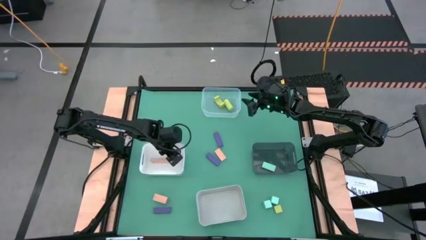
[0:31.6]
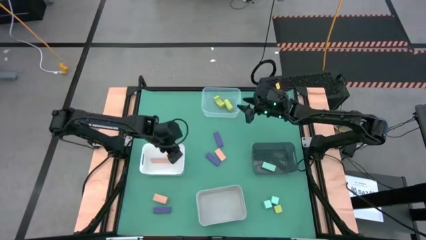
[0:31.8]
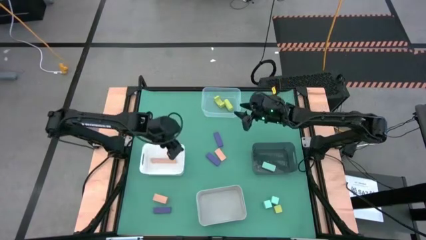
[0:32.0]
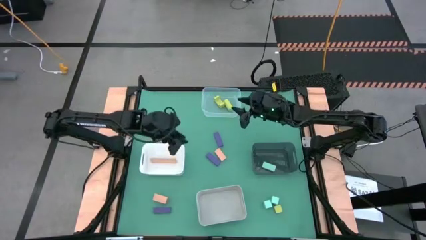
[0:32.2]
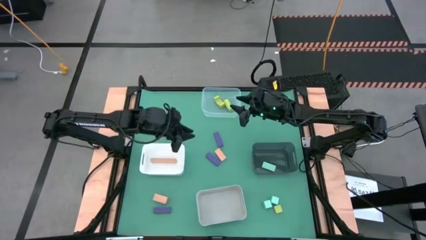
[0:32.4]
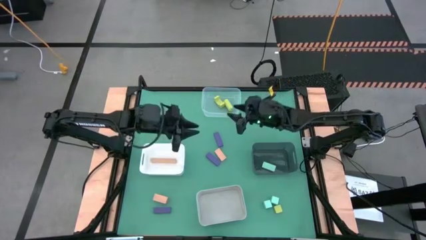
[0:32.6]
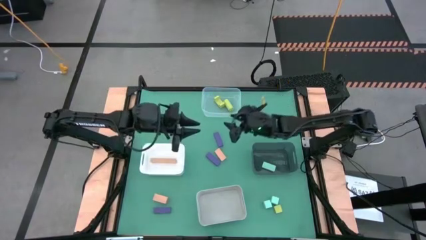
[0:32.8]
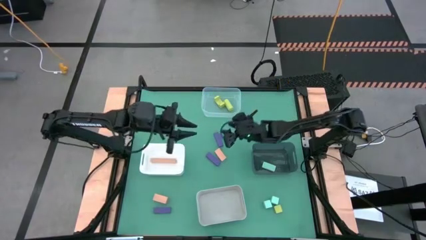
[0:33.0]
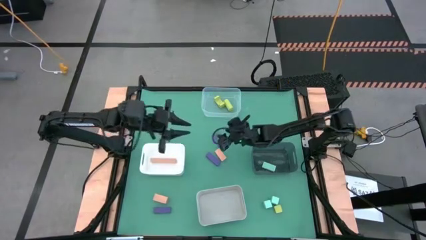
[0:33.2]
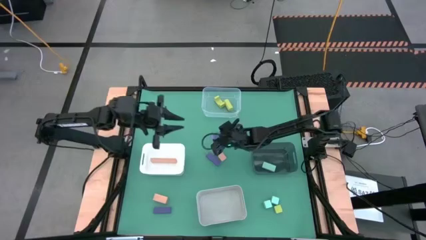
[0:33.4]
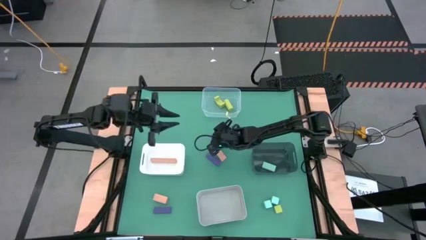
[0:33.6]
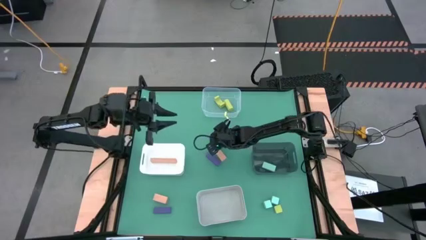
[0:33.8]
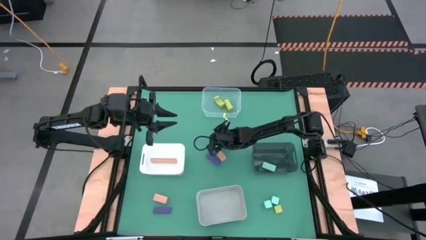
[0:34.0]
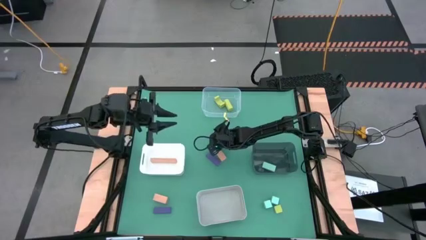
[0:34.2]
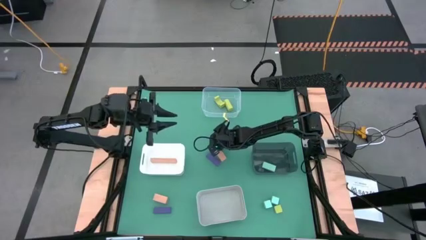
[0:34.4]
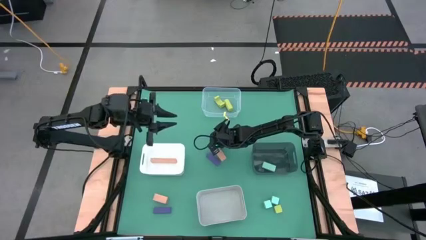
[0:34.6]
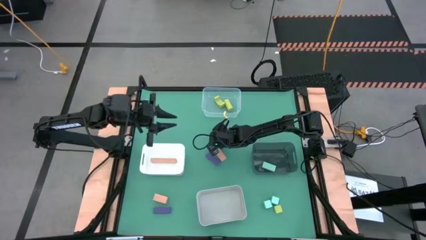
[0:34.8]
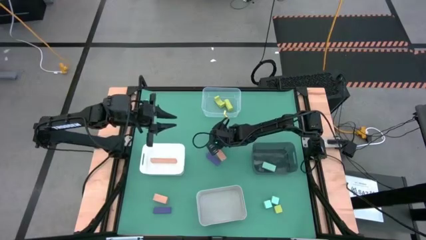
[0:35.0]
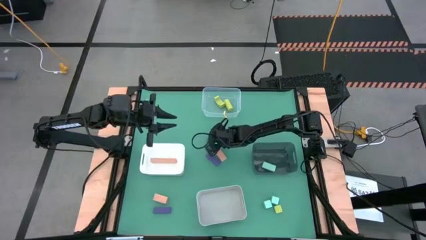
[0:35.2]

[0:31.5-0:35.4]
Task: Sort & place blocks by color
Put the top purple block into the gray bin

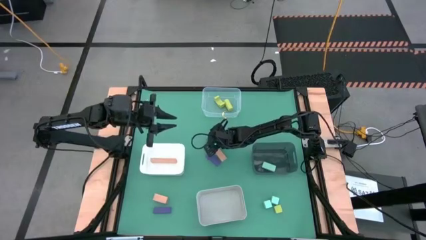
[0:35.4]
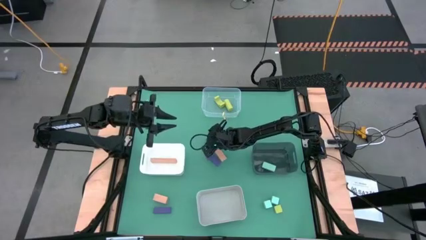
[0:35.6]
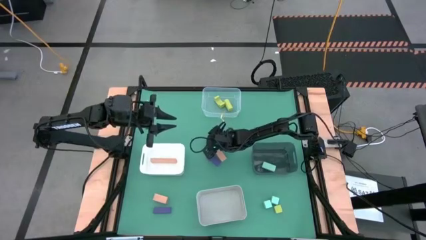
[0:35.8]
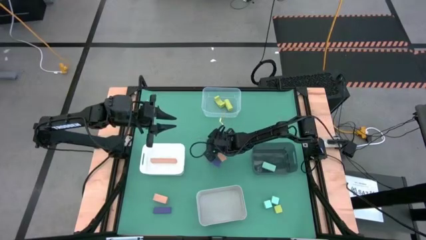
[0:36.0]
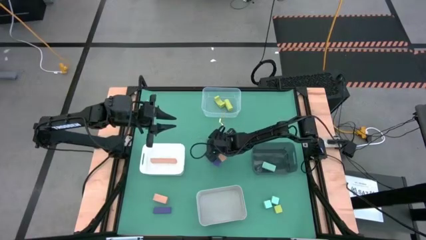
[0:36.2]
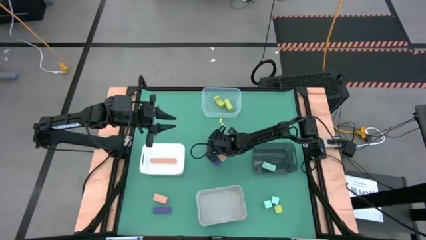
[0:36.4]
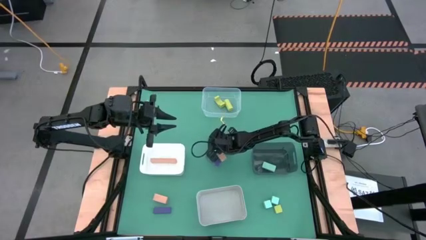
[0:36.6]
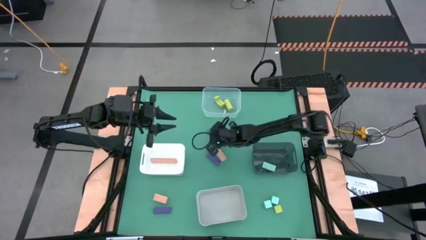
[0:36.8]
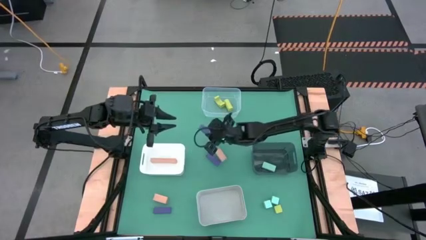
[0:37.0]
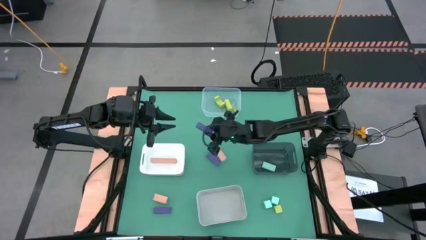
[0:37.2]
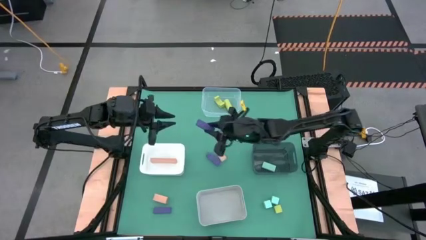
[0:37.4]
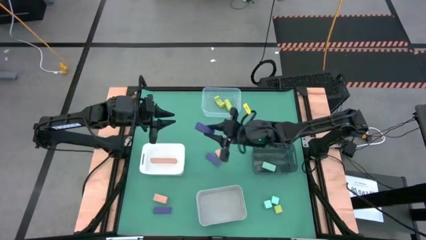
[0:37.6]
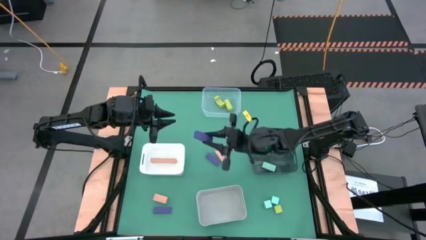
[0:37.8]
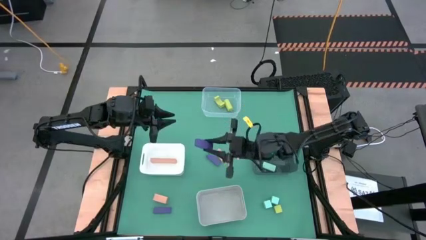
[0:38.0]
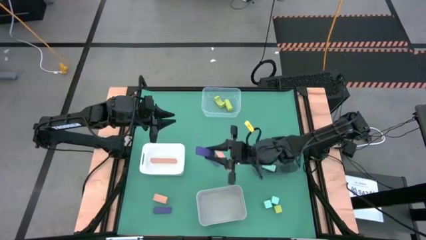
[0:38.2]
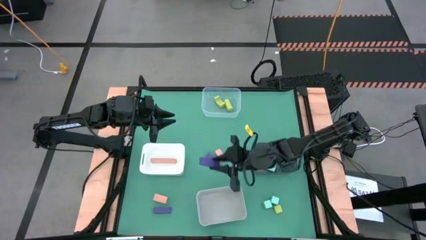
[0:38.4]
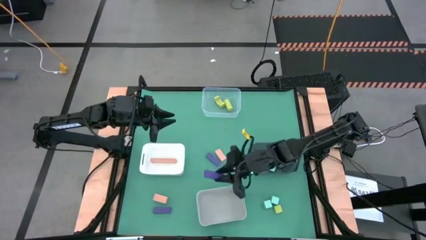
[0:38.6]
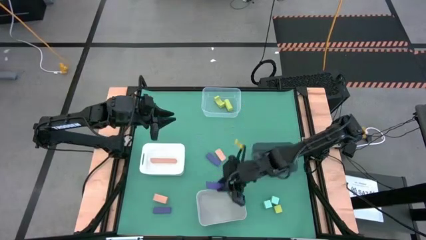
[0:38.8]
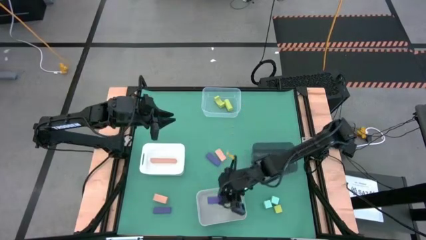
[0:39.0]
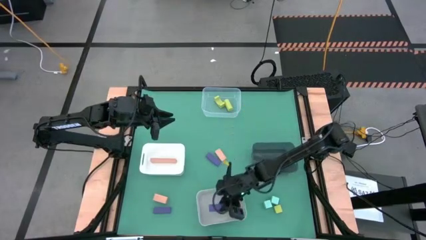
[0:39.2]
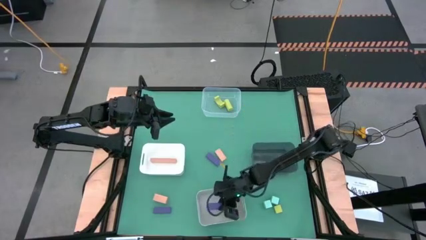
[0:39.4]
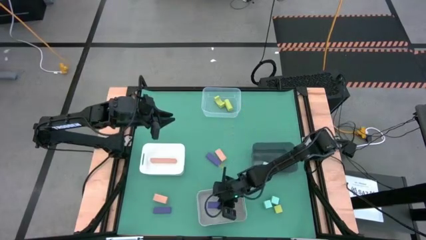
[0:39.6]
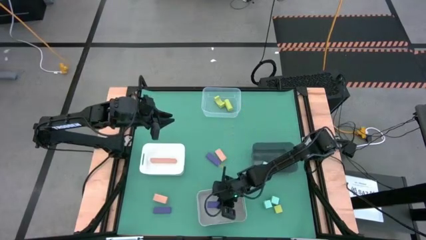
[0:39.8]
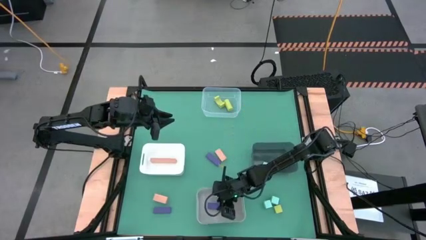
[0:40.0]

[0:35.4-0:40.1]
Put the top purple block into the gray bin

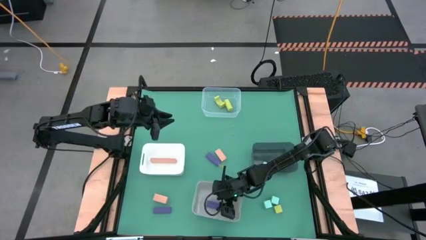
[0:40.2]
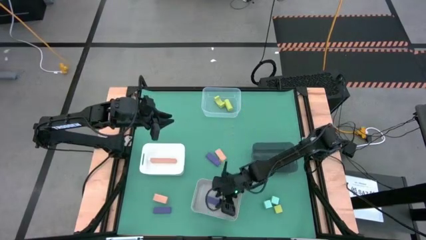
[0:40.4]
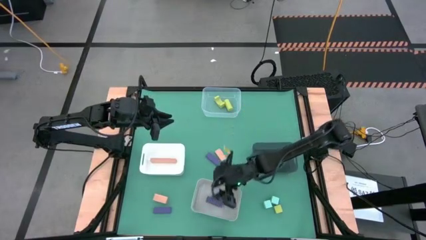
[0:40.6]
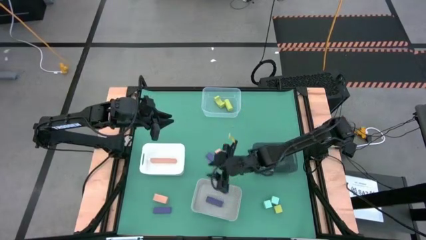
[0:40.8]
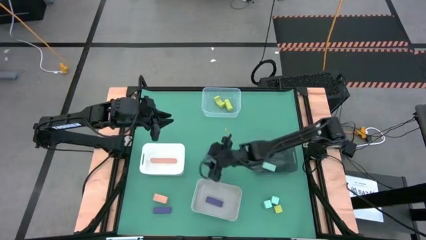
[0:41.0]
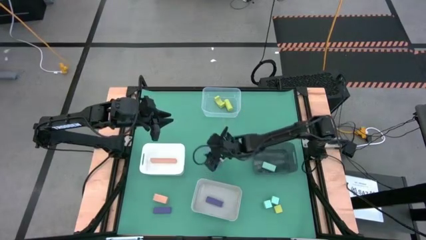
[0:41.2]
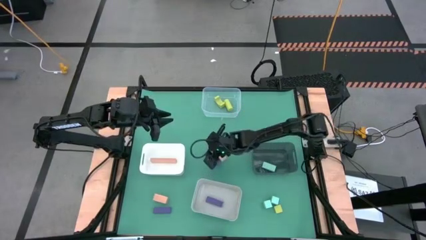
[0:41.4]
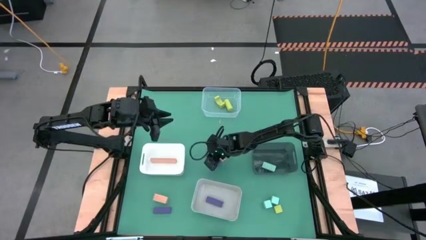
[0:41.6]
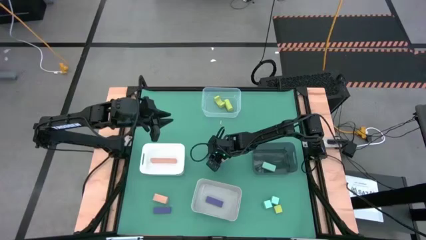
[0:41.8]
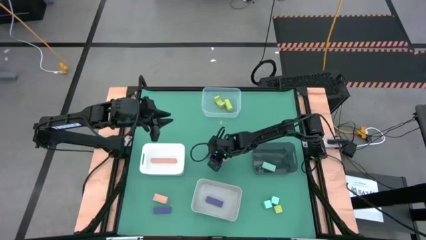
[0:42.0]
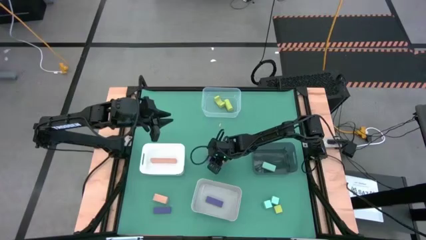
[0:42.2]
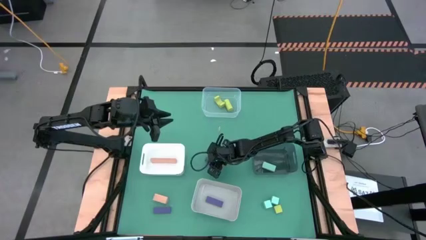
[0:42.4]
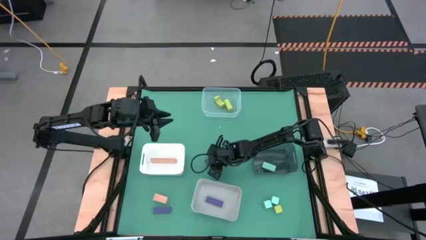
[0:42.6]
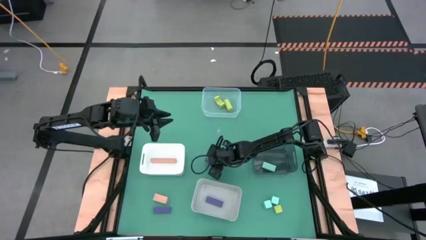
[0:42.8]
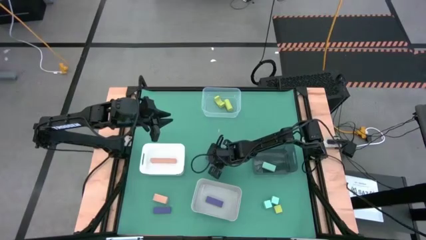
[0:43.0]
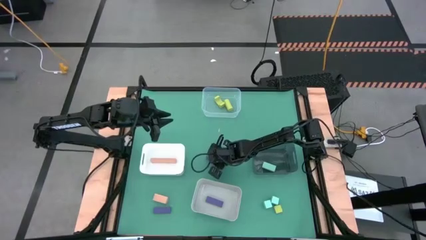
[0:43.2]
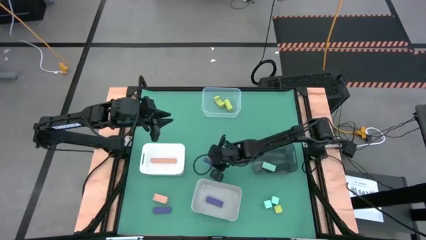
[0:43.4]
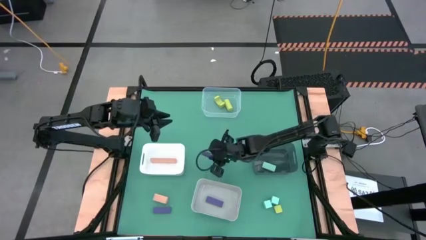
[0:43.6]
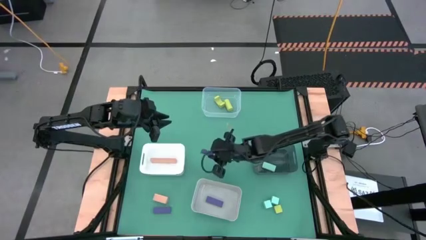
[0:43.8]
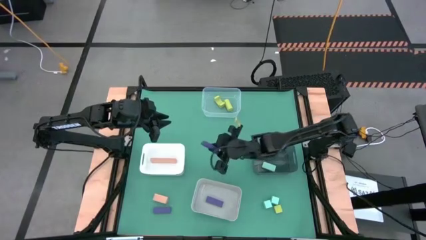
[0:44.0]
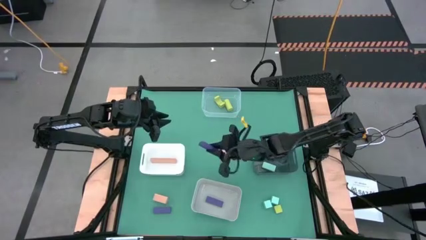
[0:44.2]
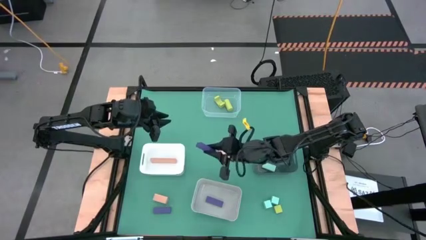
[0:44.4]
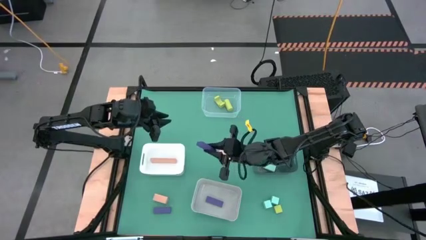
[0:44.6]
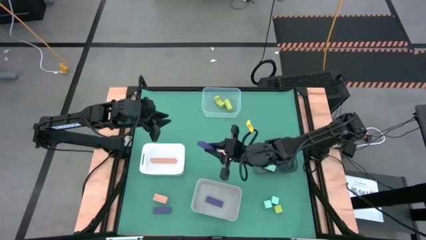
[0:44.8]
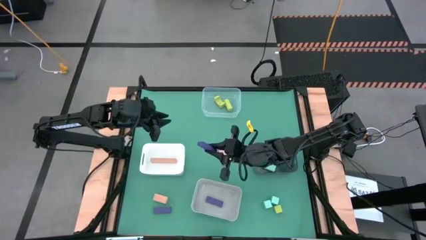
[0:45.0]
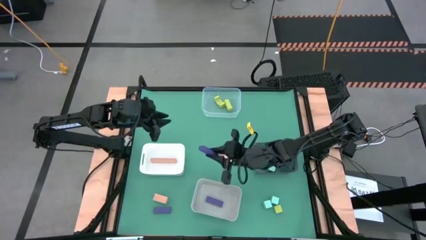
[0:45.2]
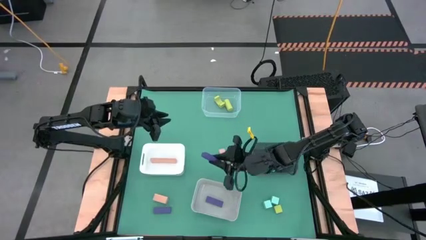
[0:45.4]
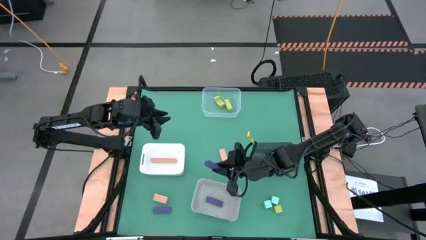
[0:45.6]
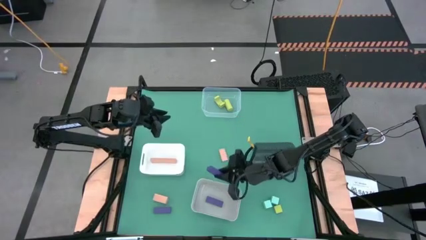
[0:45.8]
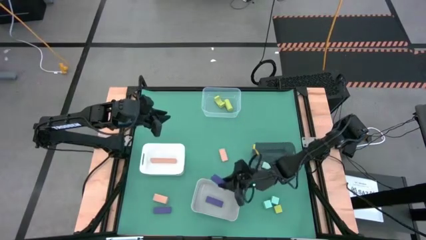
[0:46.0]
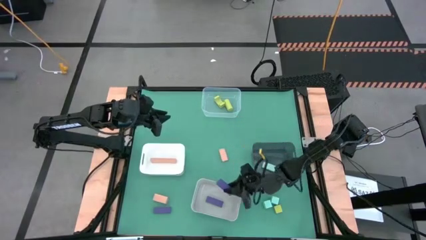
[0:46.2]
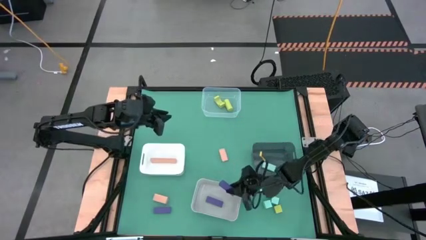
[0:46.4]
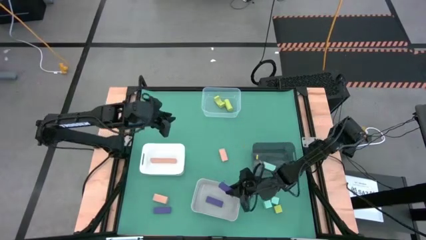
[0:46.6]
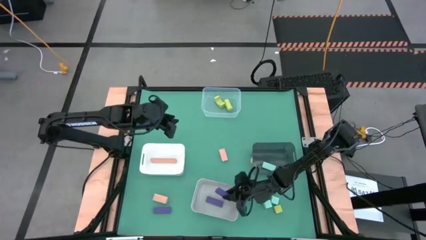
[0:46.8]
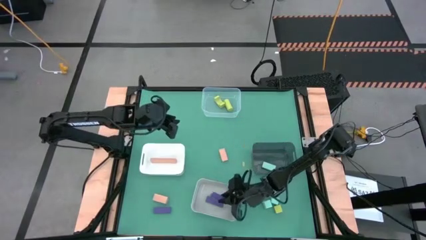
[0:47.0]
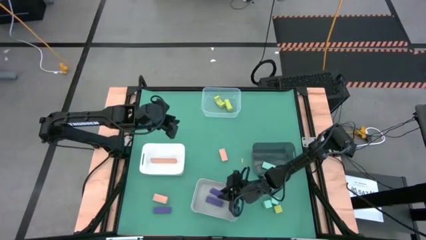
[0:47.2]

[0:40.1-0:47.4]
Put the top purple block into the gray bin
